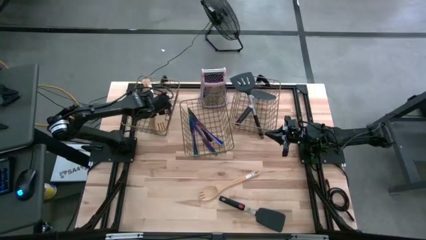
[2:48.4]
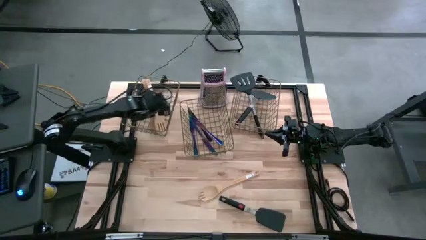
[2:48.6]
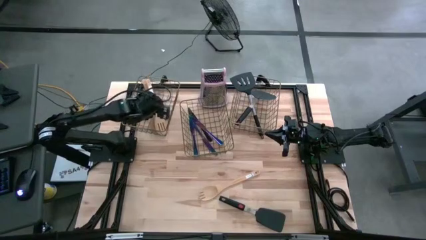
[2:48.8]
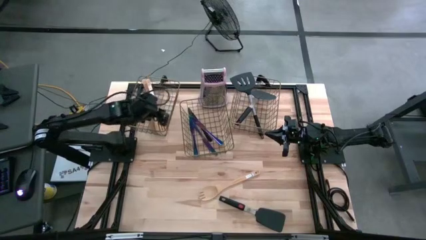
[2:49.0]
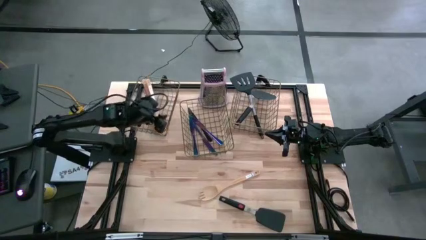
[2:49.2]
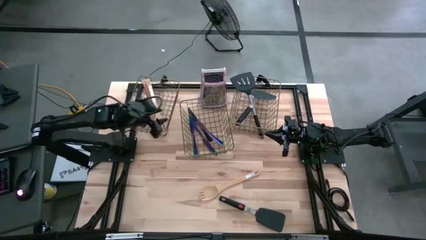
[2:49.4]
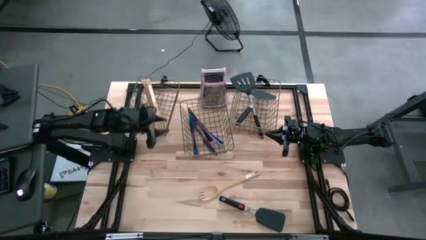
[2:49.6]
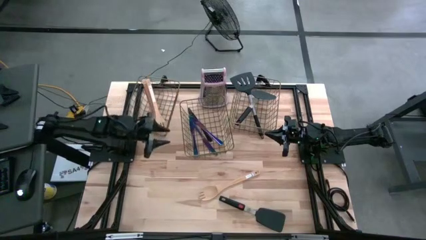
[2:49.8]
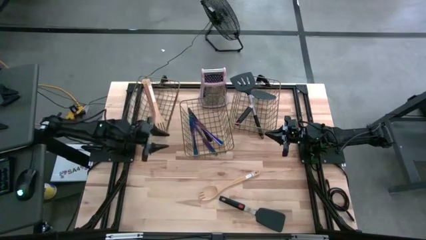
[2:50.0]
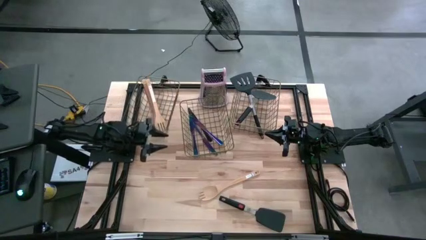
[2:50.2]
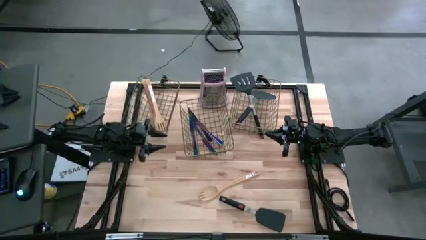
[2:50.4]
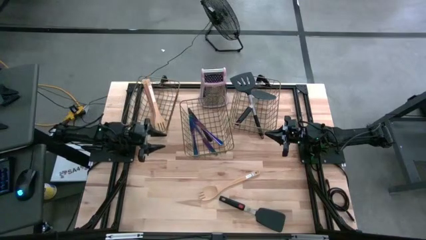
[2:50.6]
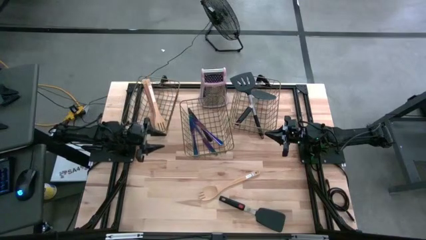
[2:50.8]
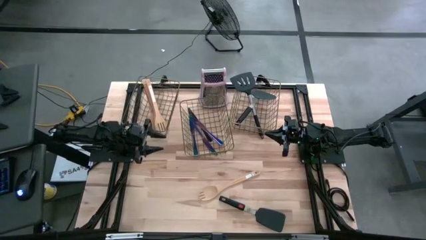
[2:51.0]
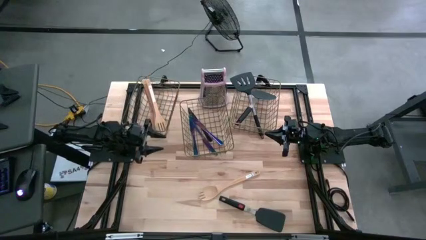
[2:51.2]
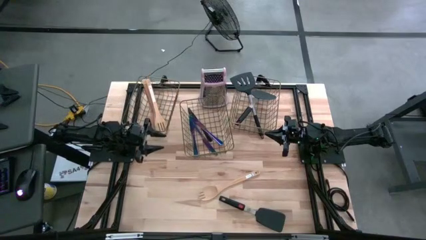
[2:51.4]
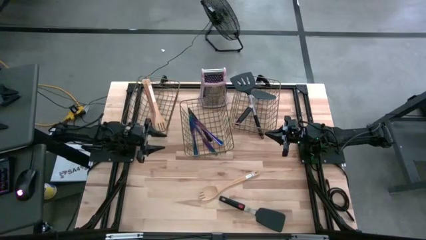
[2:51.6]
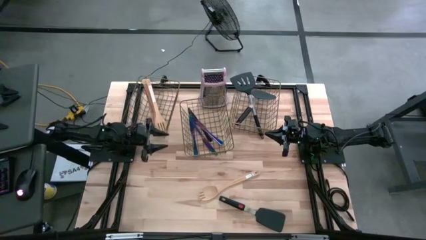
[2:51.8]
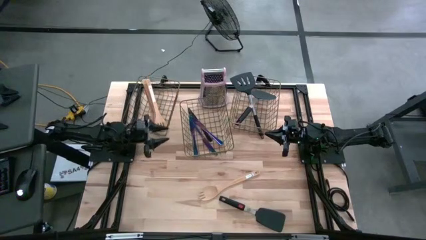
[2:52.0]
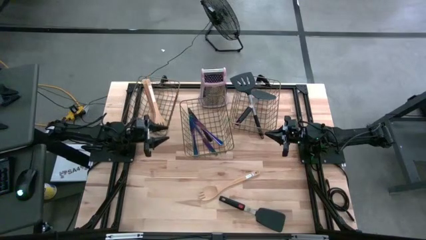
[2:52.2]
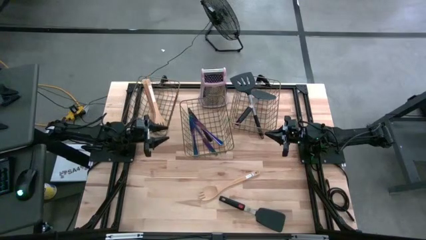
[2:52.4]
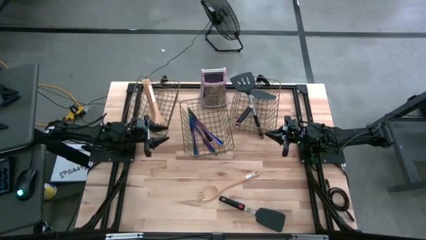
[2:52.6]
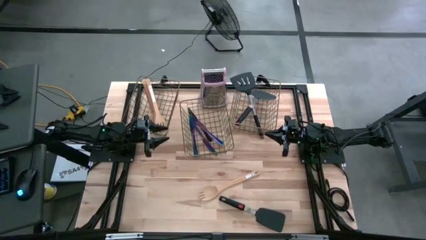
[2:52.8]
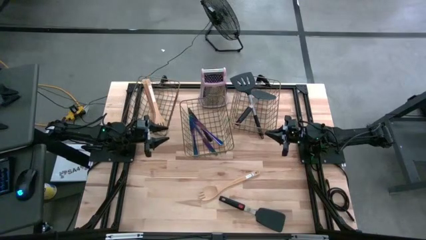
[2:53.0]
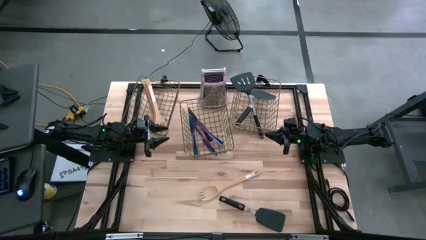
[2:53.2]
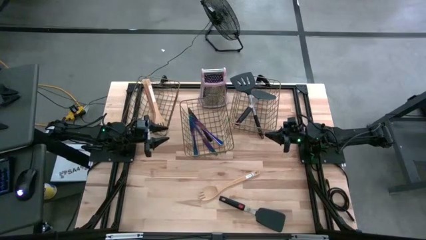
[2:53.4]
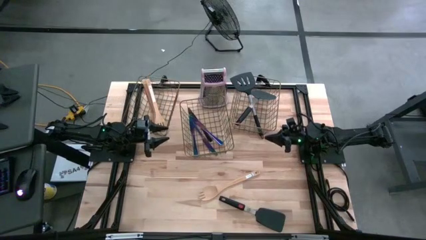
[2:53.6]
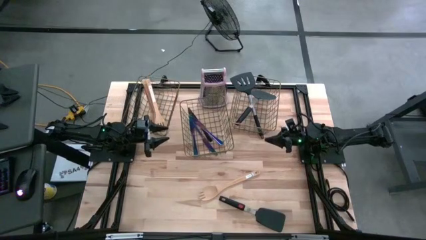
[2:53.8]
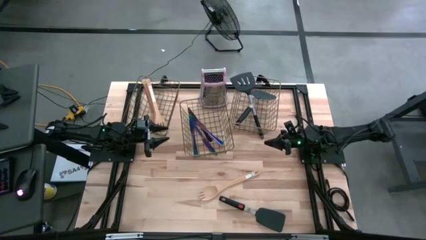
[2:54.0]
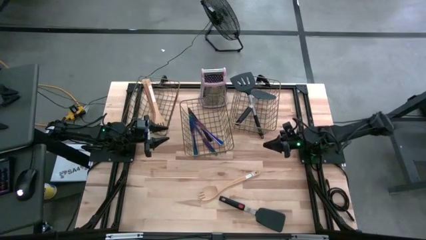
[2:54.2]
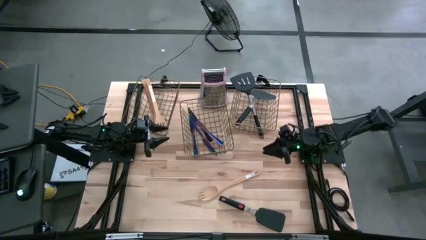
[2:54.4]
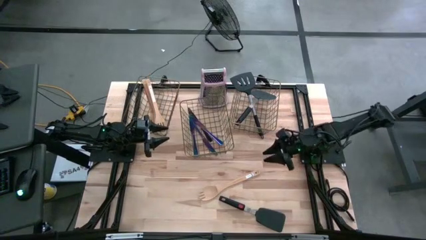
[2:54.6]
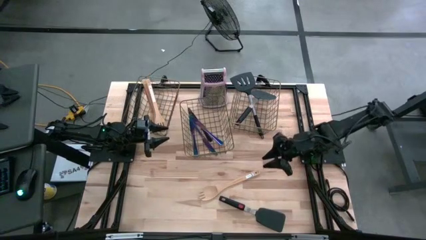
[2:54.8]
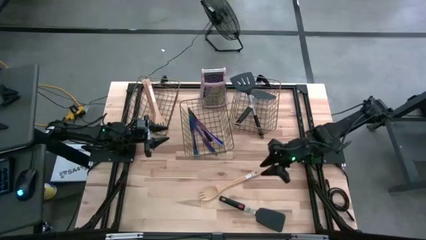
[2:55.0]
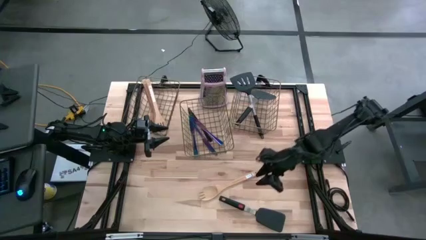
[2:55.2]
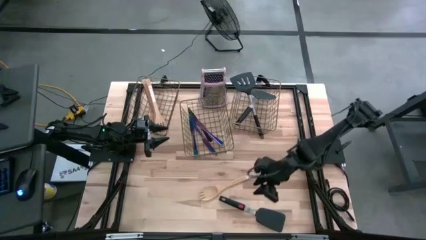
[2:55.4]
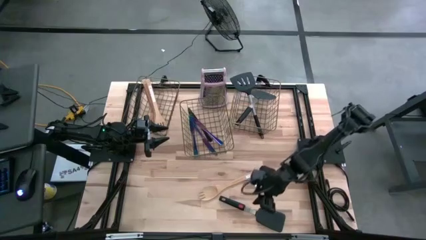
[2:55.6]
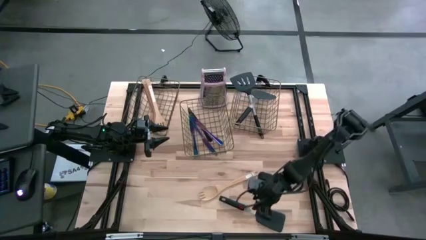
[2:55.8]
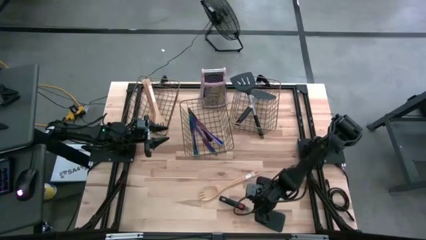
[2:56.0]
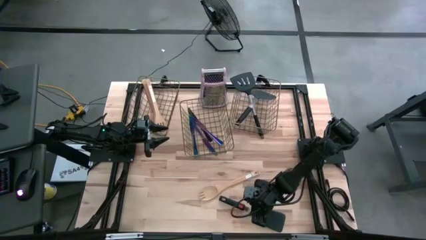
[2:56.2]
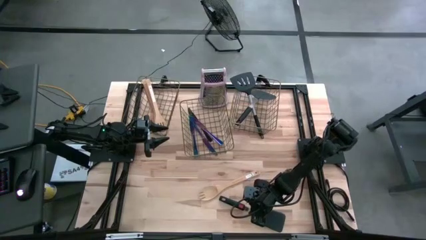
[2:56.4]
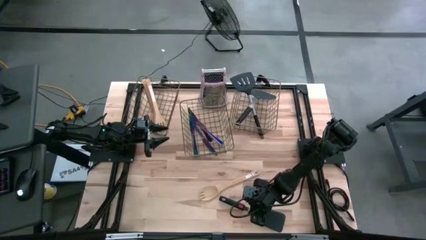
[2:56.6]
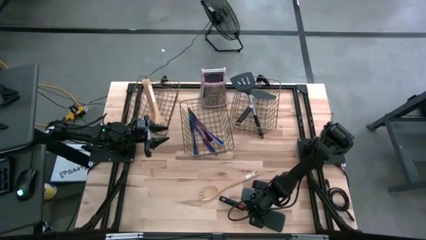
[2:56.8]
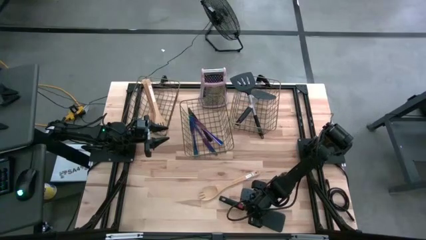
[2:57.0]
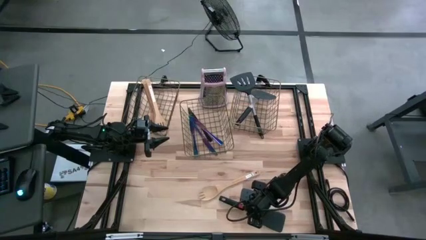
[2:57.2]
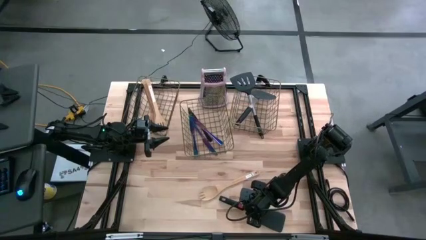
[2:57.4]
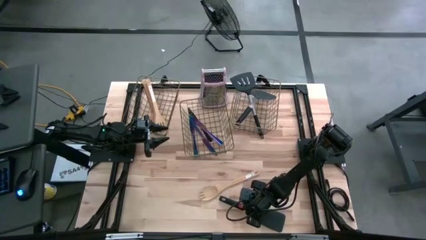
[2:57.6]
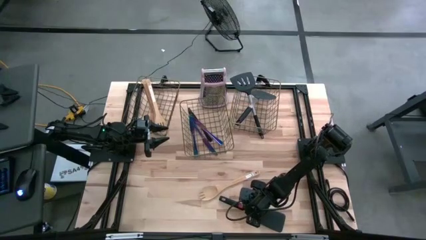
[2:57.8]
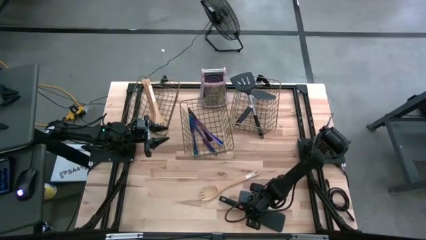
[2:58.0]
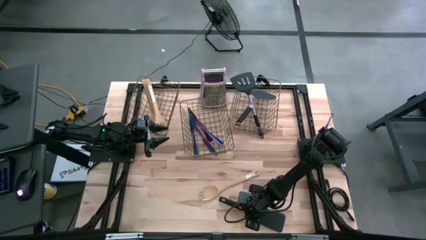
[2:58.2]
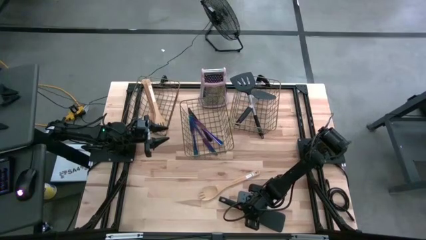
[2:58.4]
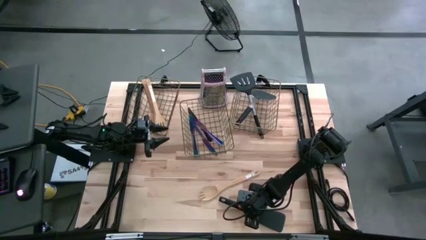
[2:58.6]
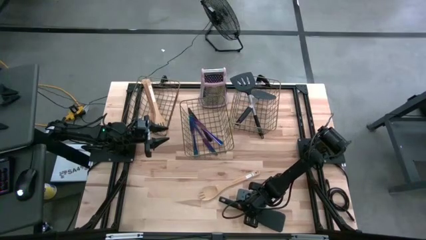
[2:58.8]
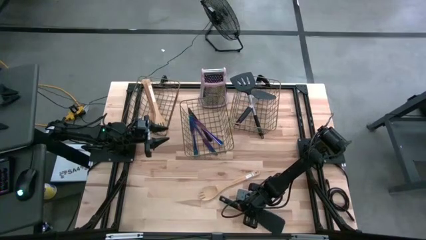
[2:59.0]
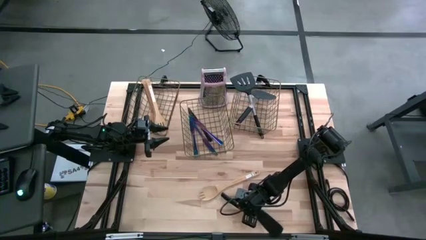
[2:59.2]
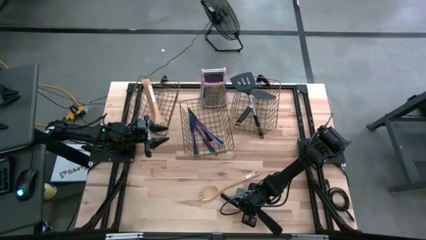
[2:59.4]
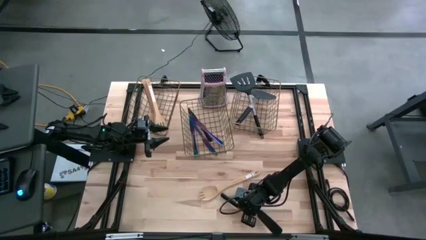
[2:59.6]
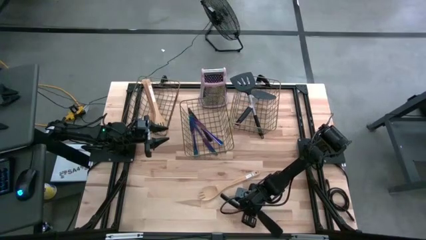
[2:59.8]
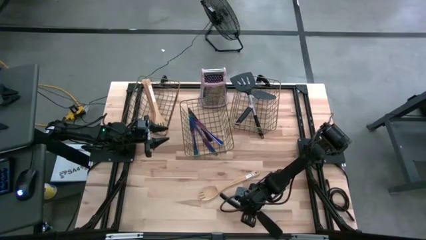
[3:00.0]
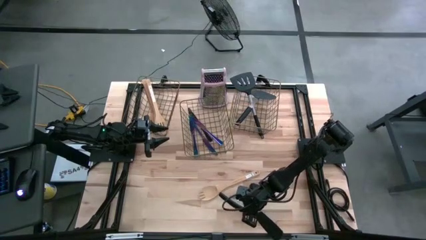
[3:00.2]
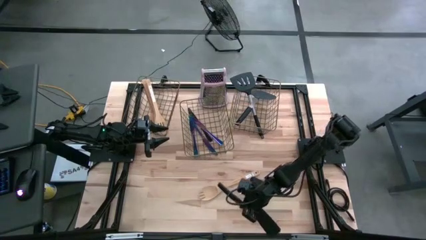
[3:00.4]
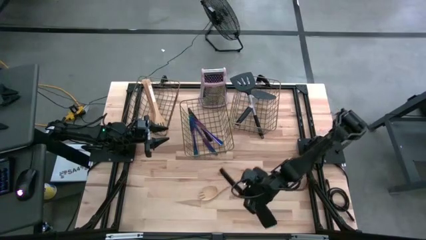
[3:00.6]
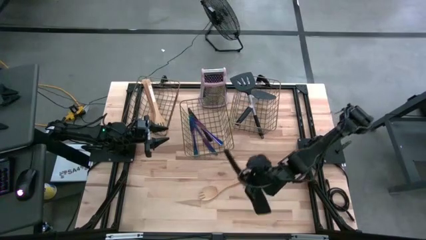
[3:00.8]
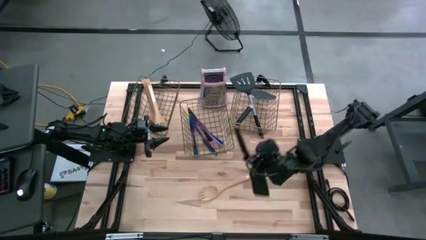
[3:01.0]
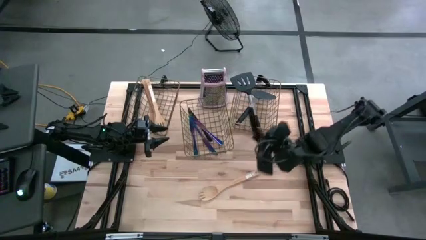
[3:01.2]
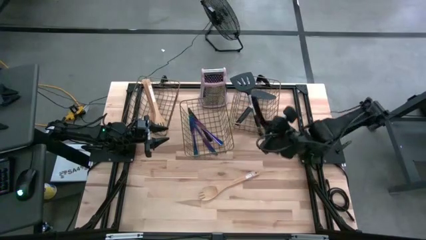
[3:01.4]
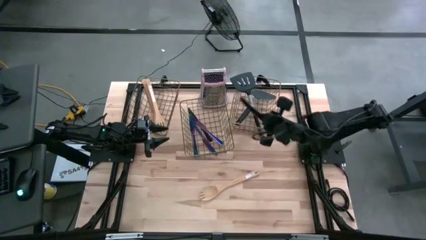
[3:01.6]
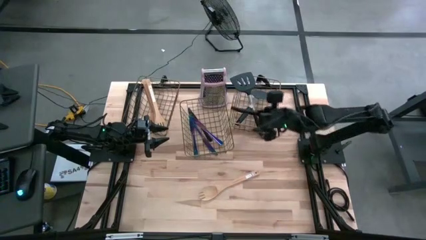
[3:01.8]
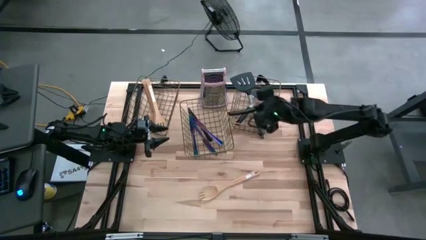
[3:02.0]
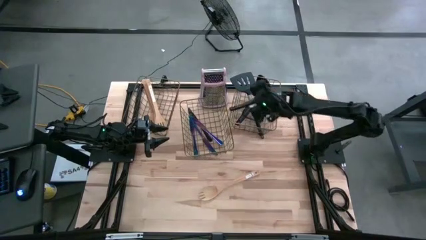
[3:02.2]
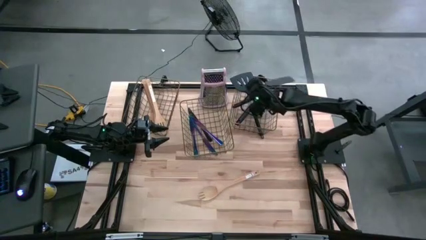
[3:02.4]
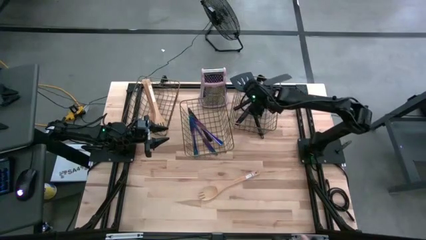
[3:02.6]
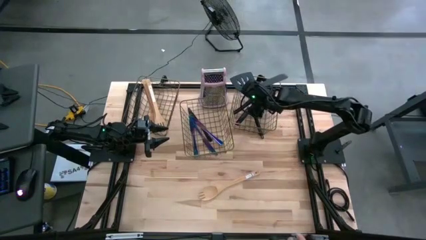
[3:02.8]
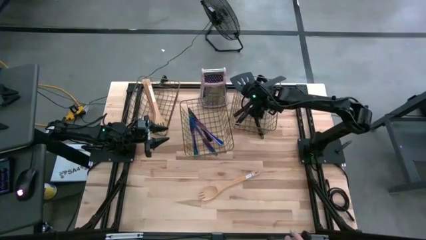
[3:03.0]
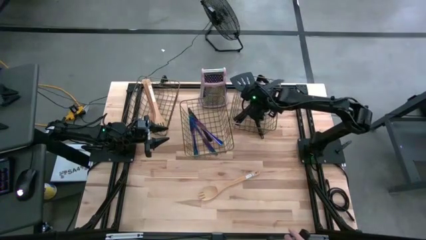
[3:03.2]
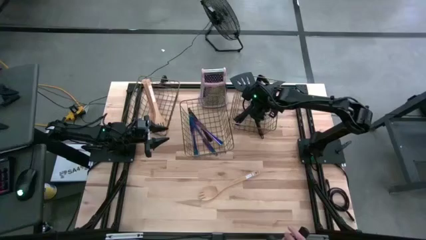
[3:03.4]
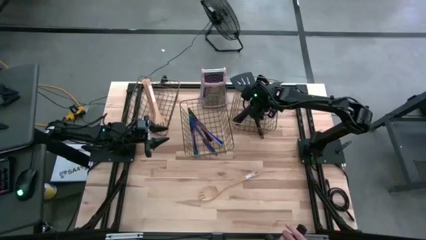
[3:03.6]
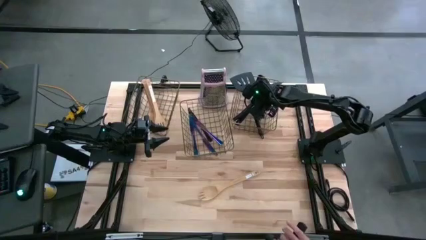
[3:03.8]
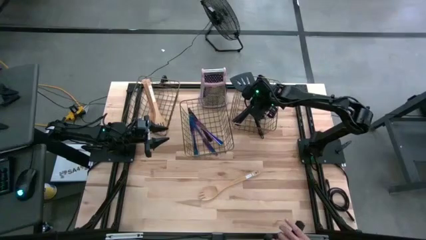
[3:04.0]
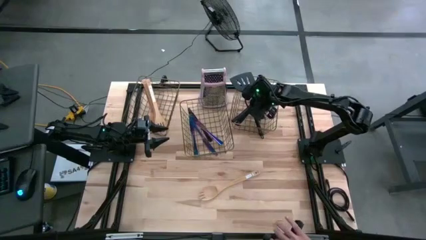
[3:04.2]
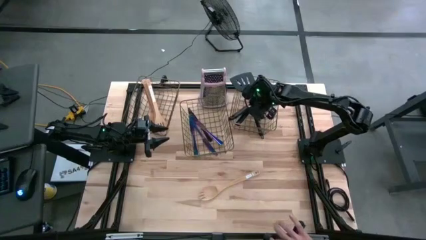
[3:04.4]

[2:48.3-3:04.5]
Task: Pick & Place Kitchen Items
Put the black spatula into the into the right wire basket

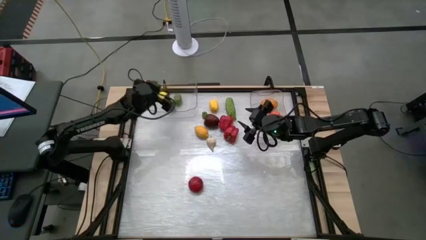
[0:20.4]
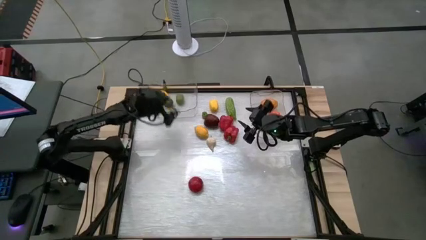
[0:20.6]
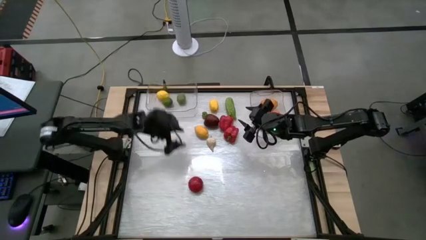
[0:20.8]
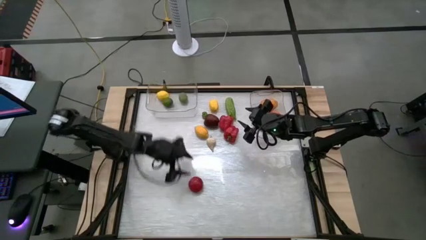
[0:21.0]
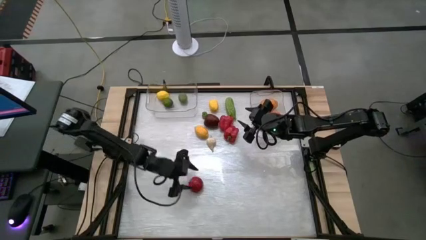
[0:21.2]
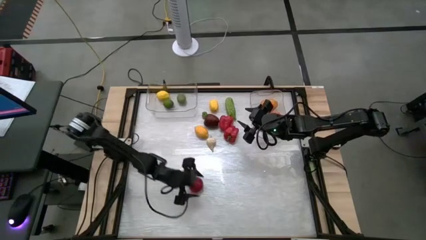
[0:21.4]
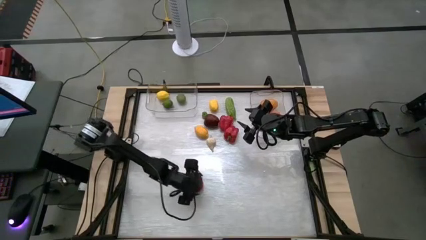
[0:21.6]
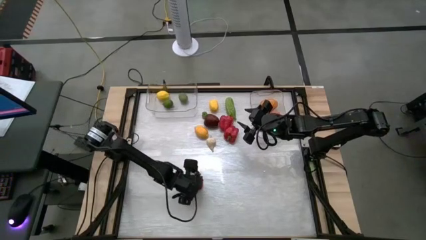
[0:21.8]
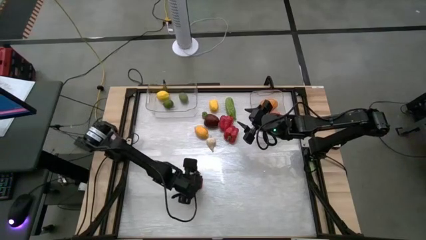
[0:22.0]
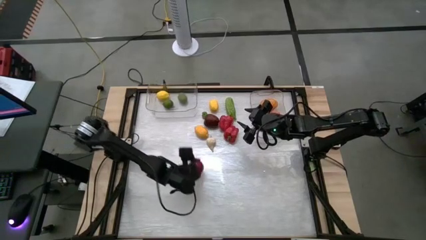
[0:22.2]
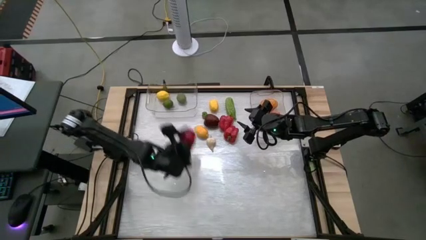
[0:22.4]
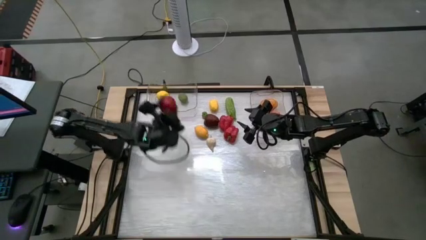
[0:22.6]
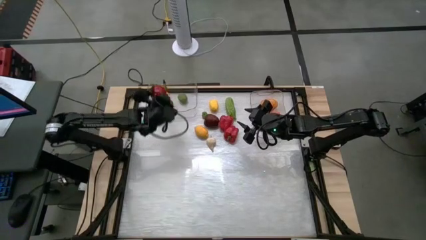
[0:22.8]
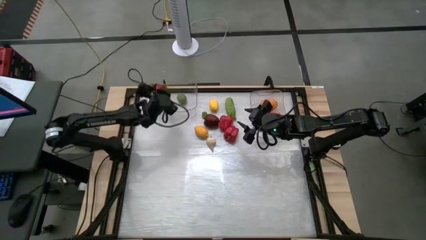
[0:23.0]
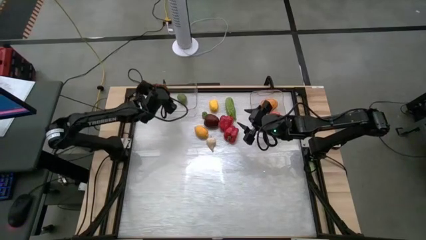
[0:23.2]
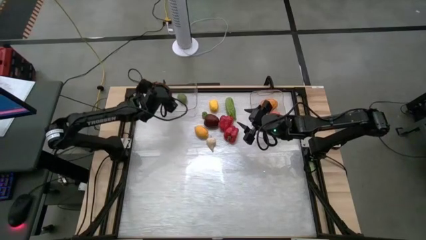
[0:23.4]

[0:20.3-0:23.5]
Task: Sort produce into baskets
Put the red tomato into the left transparent bin
